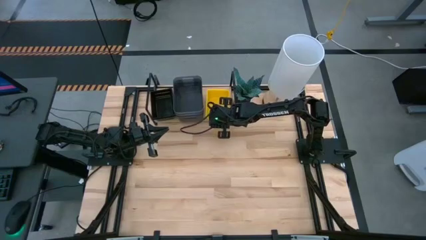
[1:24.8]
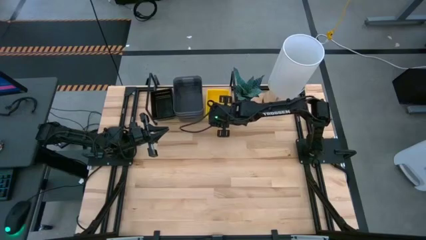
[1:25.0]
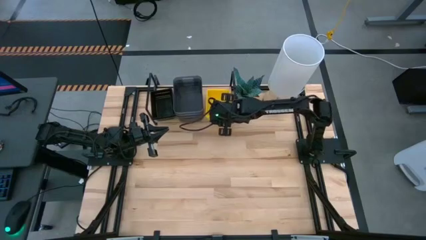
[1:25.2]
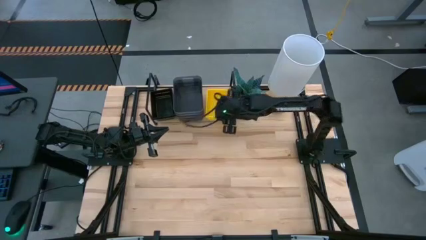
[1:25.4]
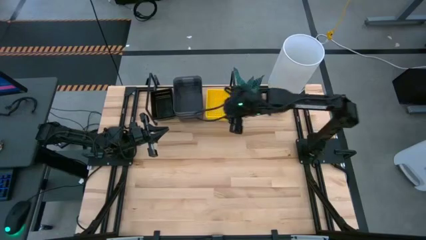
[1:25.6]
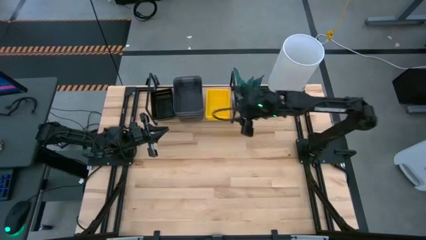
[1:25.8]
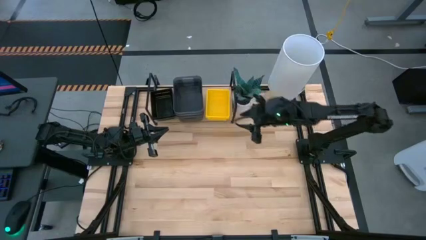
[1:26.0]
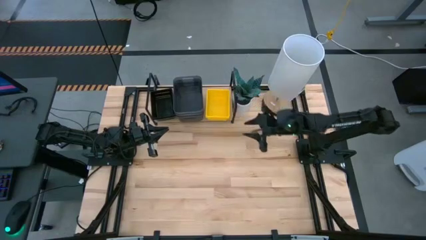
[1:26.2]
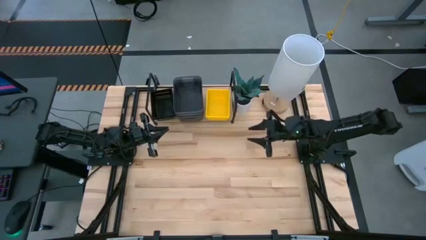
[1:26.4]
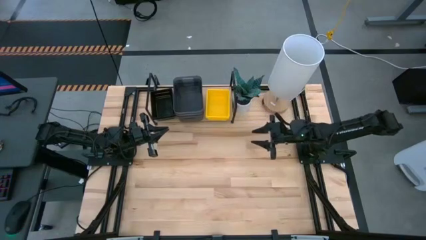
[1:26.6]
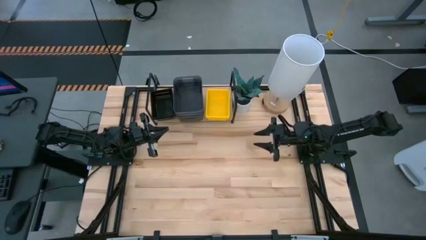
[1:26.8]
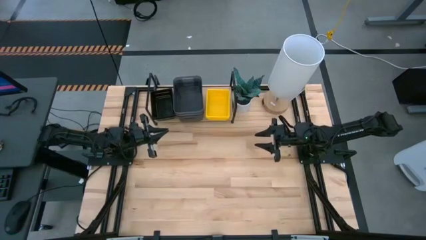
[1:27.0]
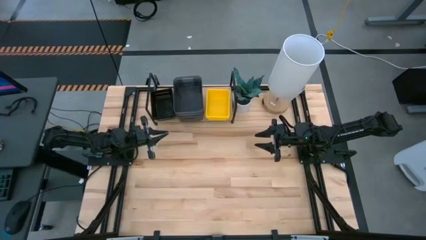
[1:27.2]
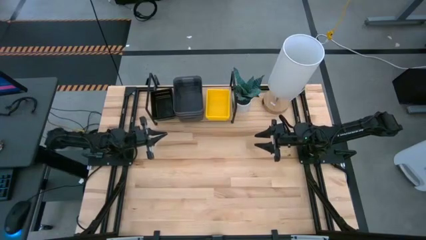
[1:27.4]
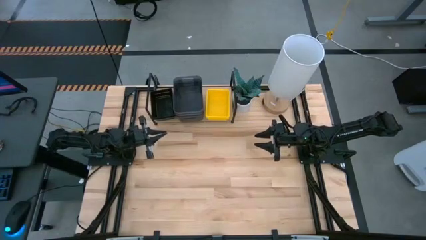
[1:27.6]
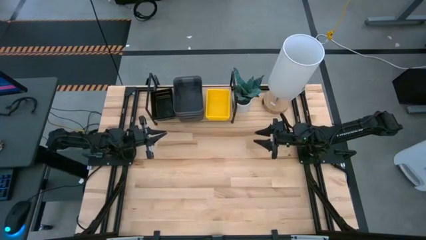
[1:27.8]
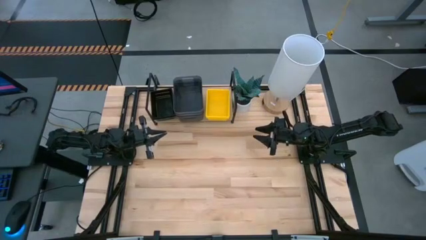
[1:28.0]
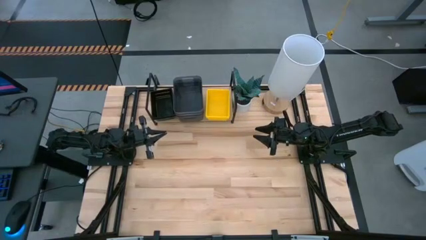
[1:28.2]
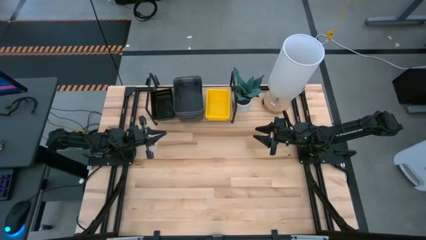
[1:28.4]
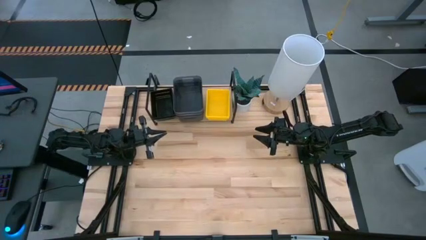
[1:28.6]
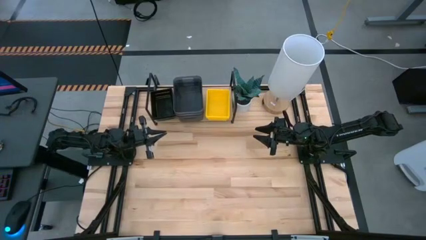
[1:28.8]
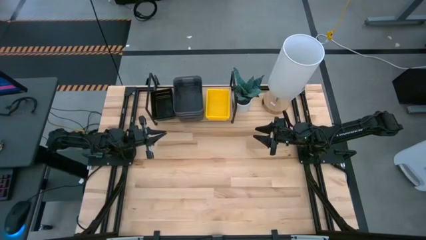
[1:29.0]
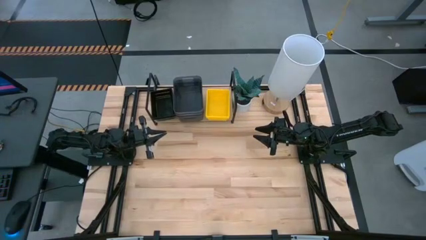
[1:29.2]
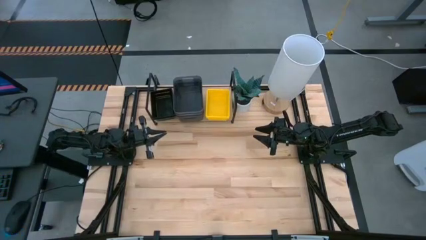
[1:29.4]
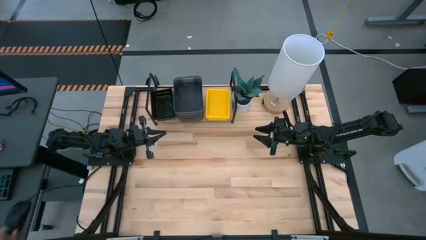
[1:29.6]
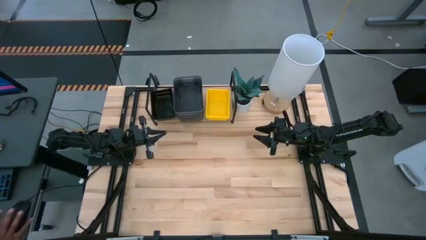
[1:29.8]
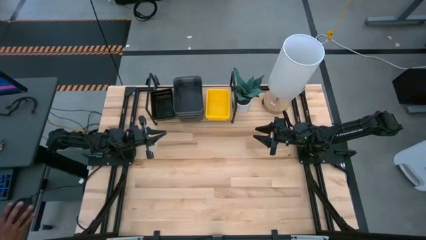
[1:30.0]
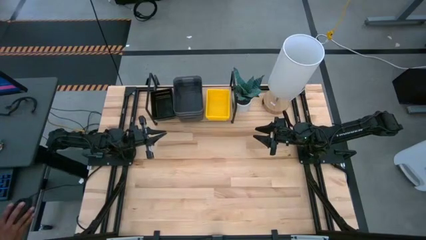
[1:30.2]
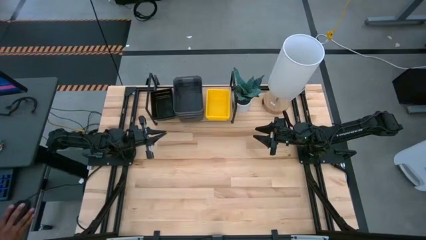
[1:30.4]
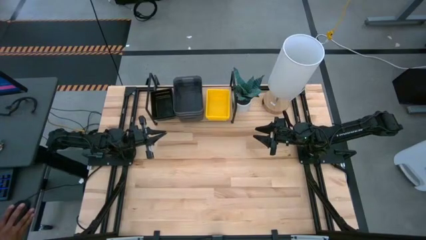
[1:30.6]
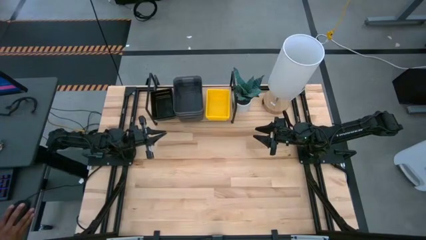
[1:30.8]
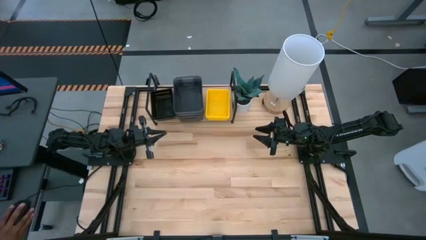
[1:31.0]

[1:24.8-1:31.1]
Task: Stack baskets on shelf by color
Return to Home Position

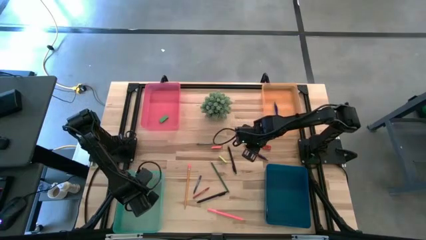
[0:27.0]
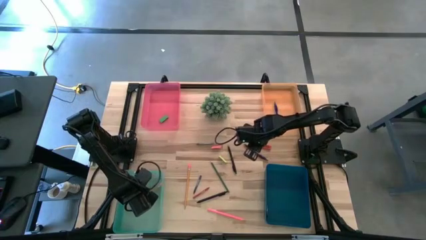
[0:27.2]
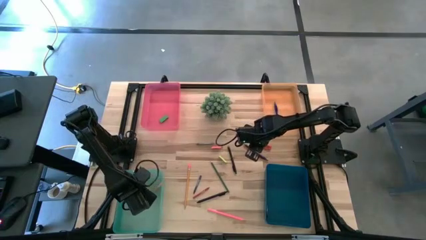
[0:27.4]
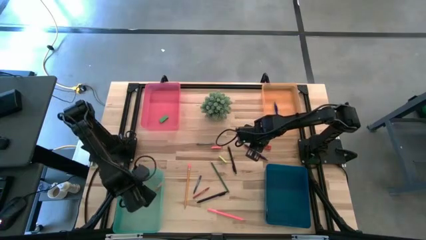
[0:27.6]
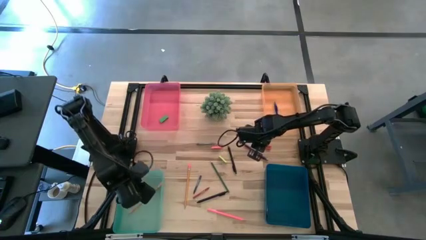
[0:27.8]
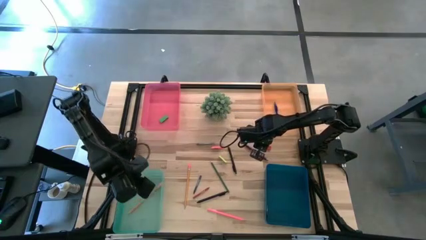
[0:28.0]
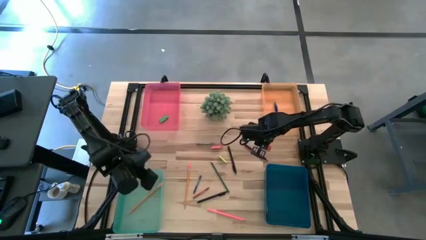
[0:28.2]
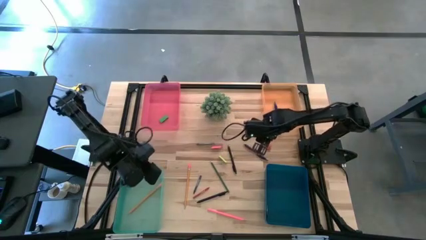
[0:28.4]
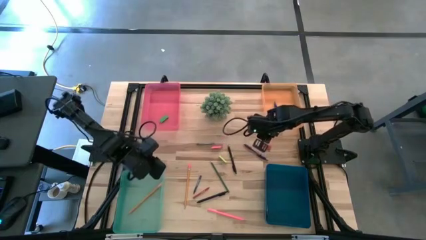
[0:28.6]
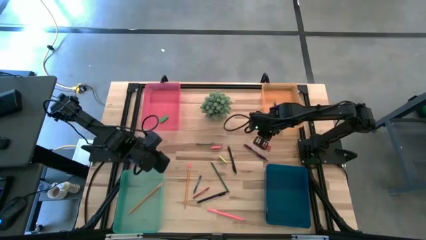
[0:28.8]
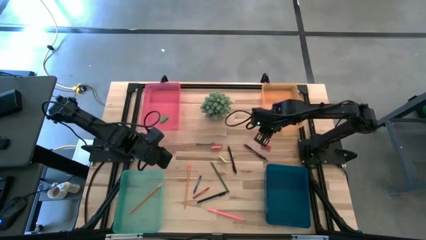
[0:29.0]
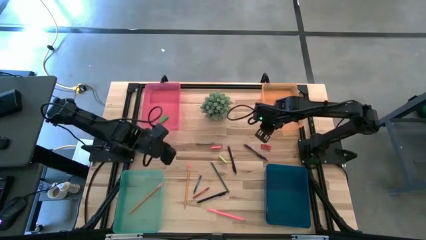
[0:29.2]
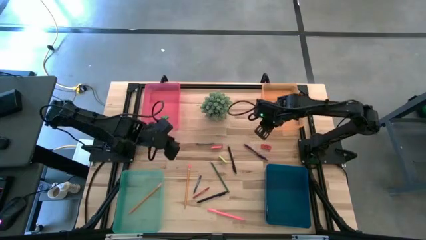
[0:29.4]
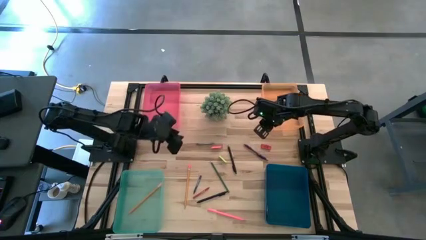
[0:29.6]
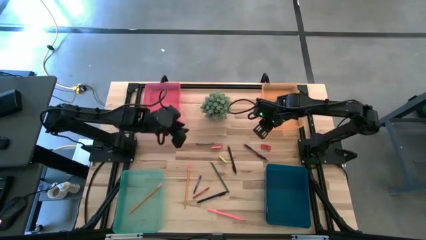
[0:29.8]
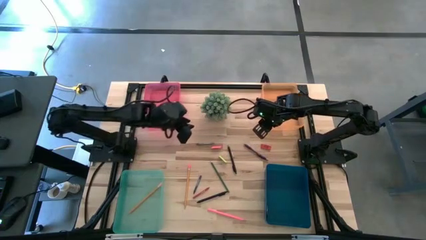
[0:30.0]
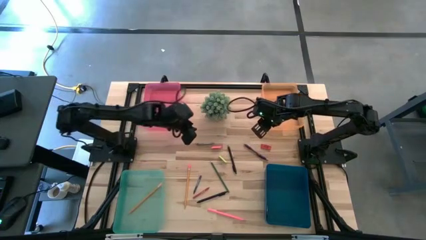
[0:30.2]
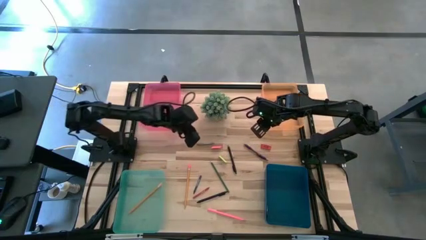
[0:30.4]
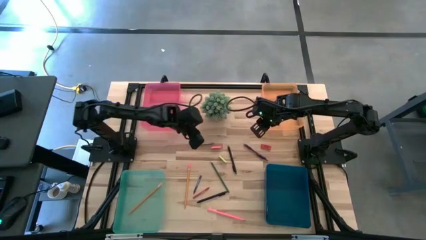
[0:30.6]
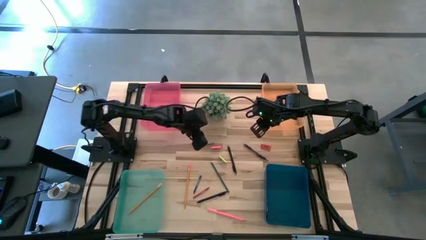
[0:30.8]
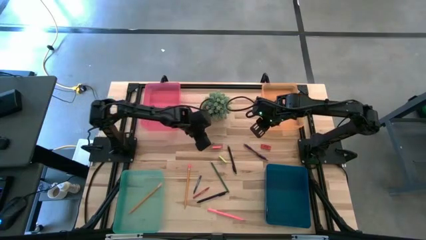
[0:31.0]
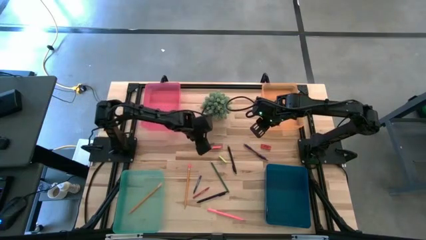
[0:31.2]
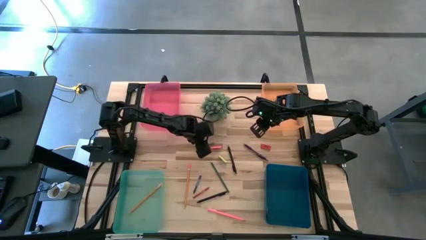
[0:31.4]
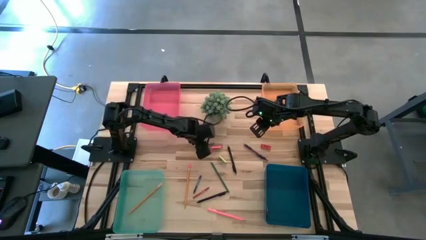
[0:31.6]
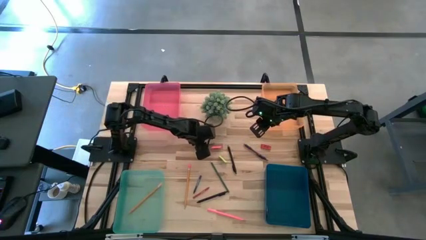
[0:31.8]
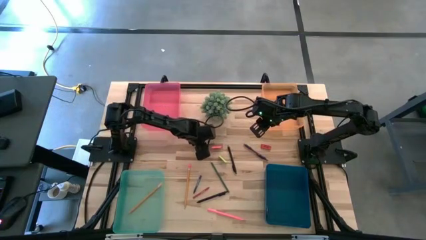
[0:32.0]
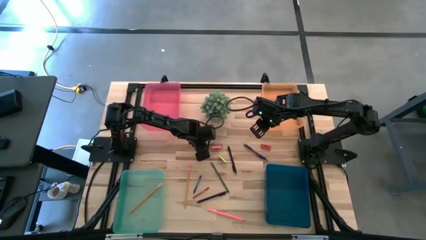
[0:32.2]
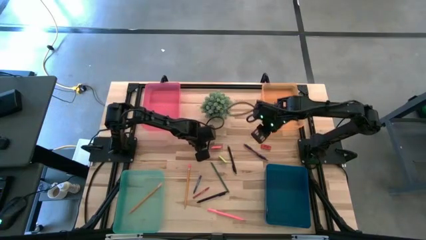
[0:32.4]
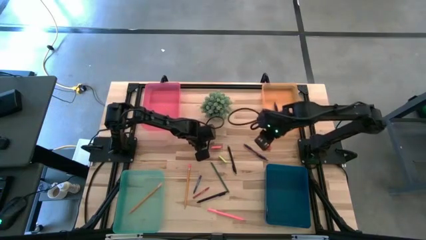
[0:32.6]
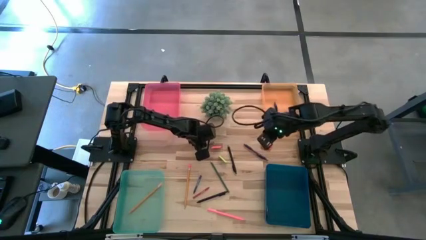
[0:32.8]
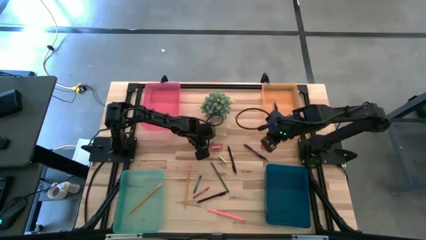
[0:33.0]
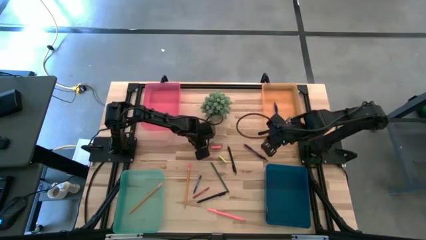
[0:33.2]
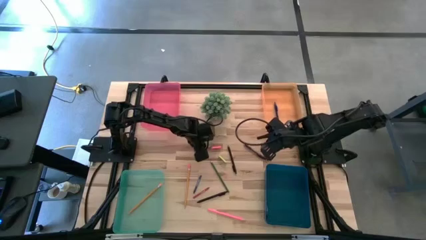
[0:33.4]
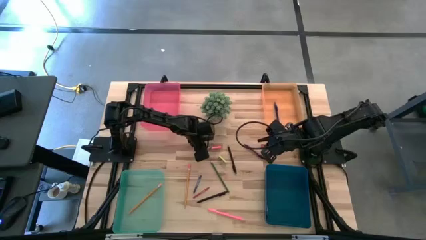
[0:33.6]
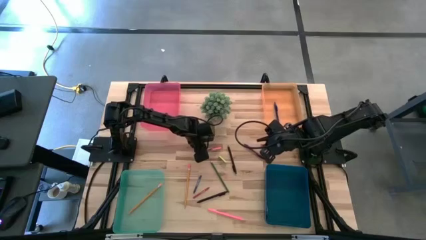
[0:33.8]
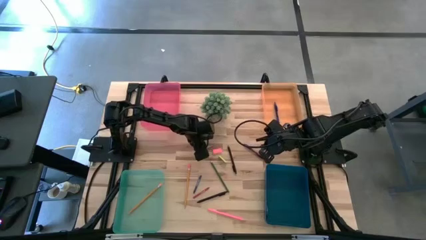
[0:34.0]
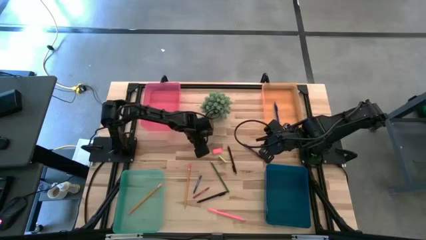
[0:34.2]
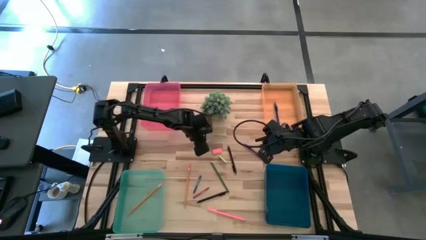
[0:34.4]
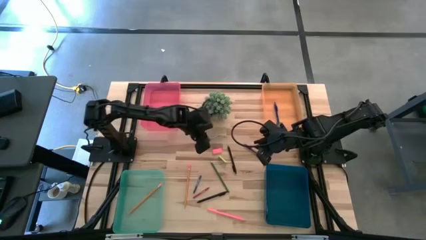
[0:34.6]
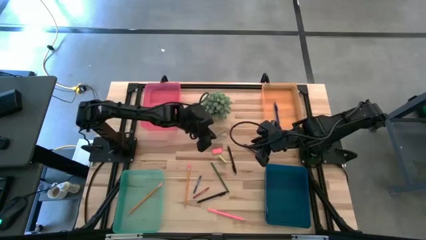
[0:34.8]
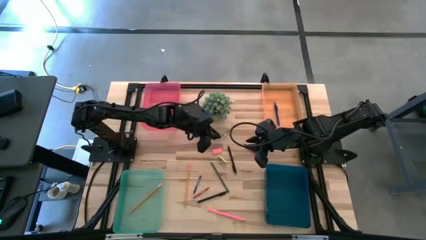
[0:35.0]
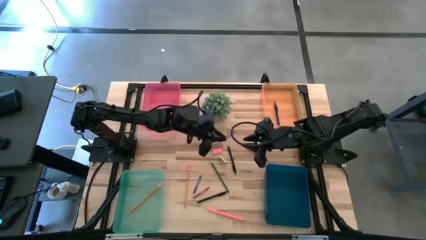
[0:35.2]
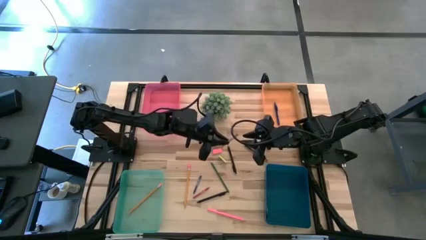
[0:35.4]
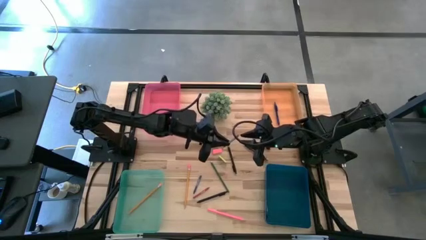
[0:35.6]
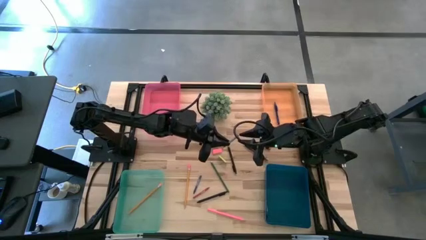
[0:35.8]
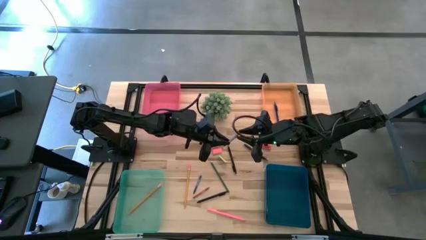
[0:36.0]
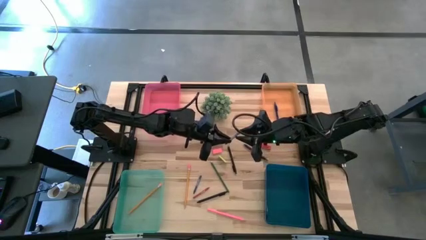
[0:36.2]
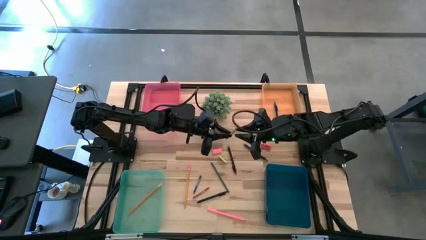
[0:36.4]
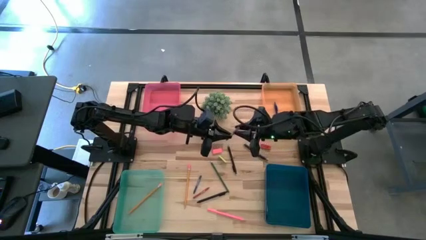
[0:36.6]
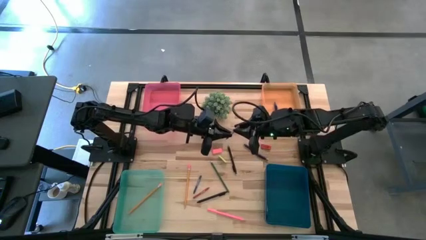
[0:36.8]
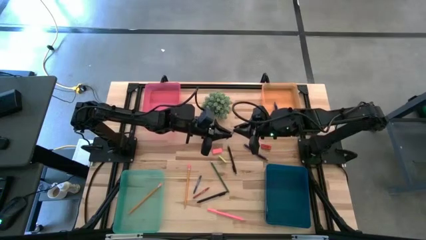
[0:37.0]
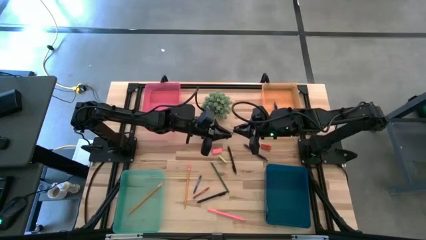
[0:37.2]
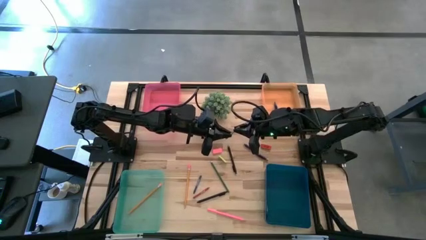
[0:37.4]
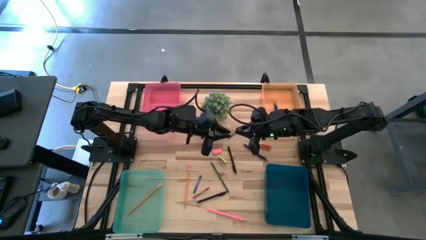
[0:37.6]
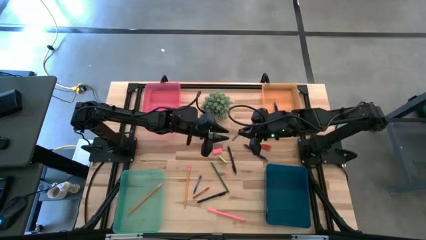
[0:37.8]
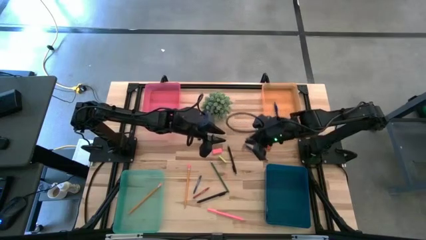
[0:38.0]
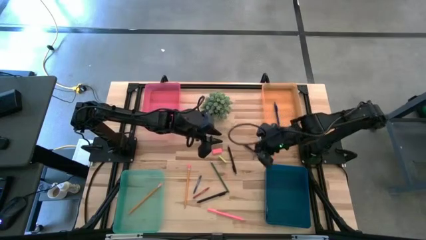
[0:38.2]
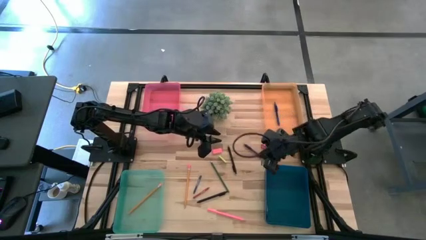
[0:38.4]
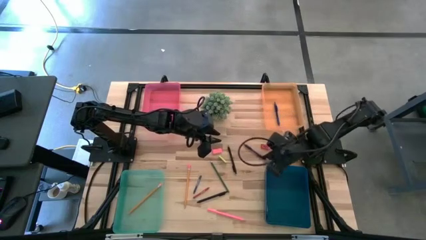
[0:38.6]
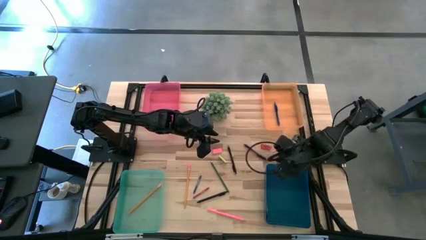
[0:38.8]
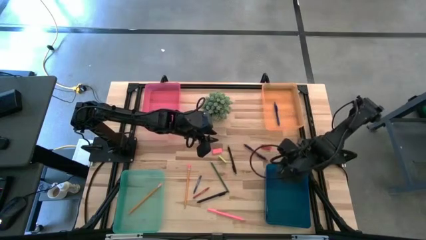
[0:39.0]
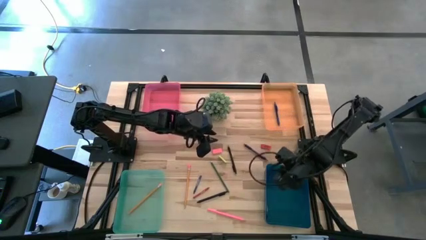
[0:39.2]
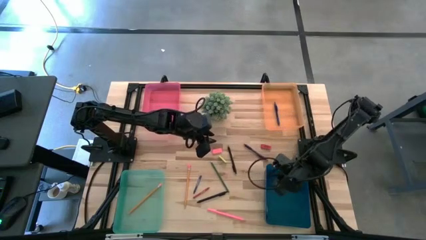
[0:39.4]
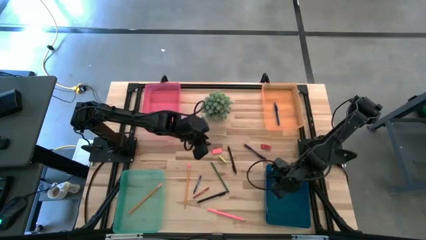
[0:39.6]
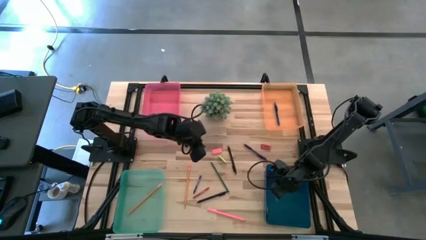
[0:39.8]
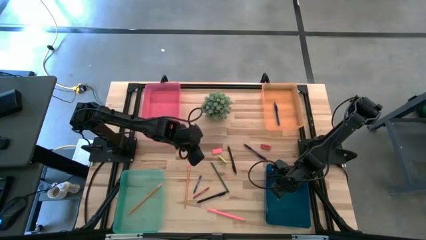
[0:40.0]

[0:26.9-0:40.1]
Task: Sort crayons/erasers/pens/pencils in bins
Put the gray crayon into the blue bin
